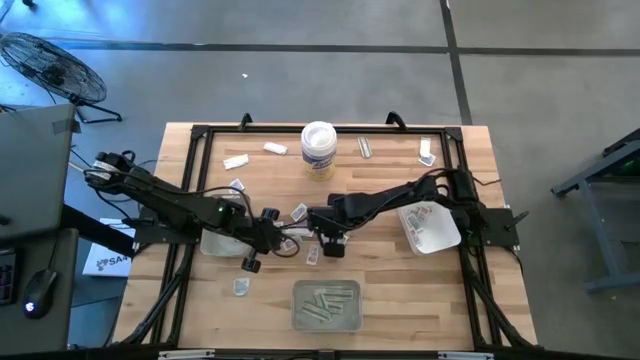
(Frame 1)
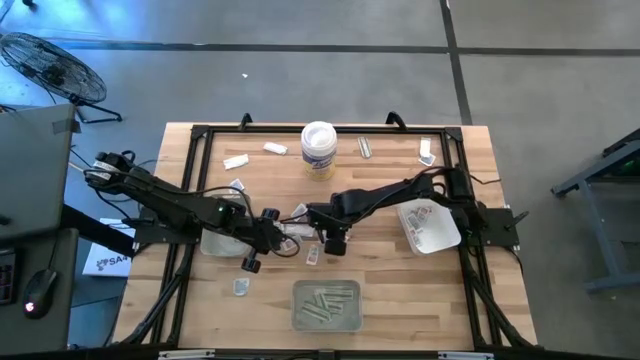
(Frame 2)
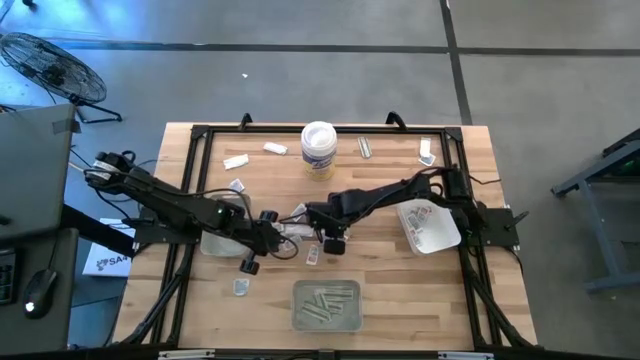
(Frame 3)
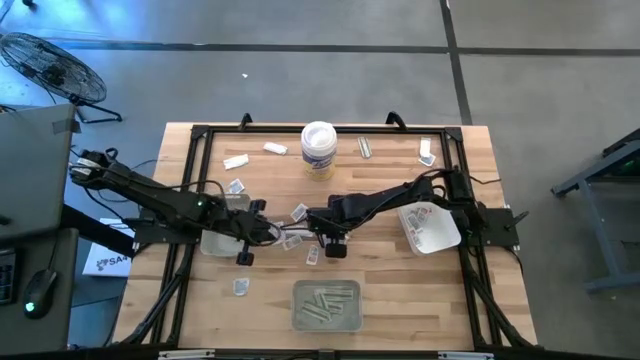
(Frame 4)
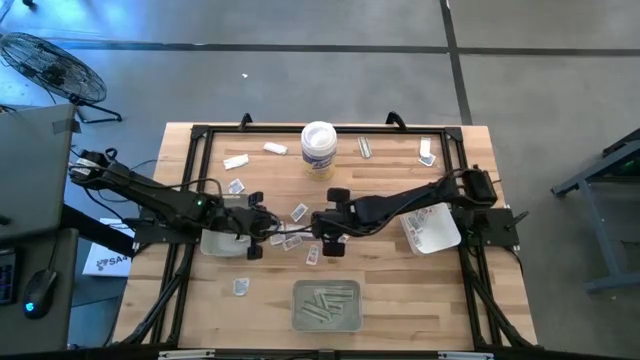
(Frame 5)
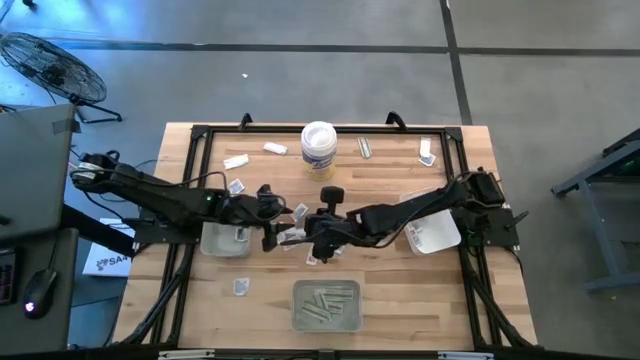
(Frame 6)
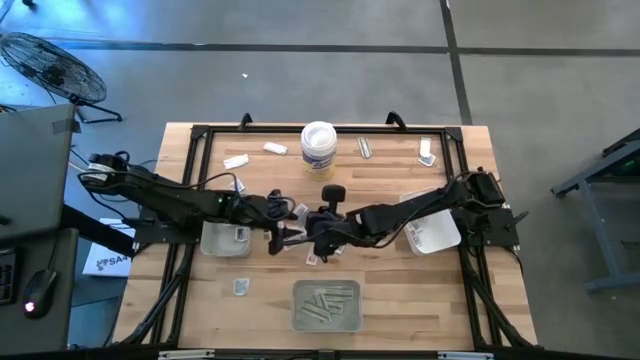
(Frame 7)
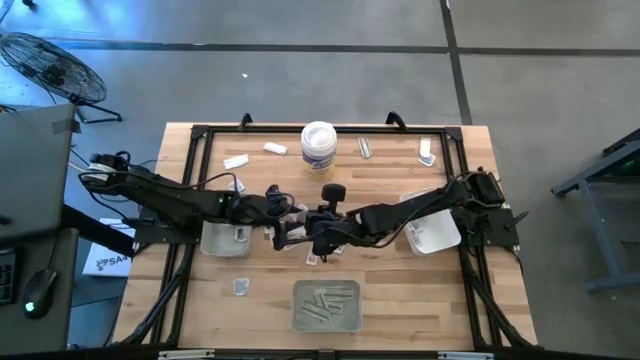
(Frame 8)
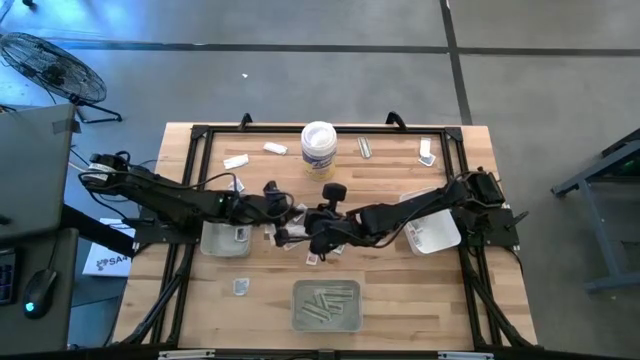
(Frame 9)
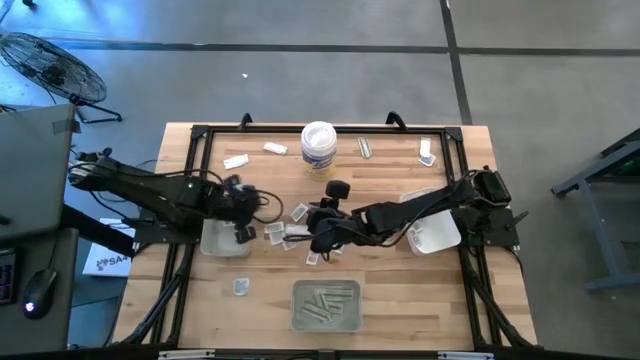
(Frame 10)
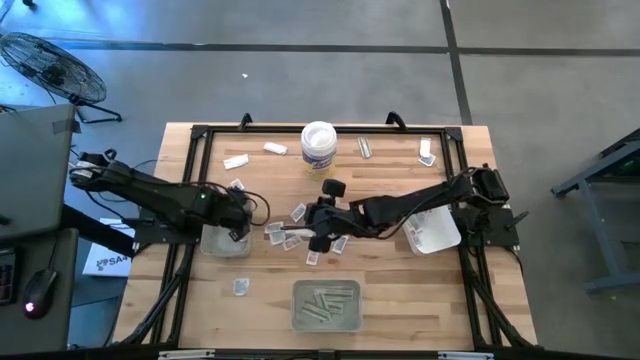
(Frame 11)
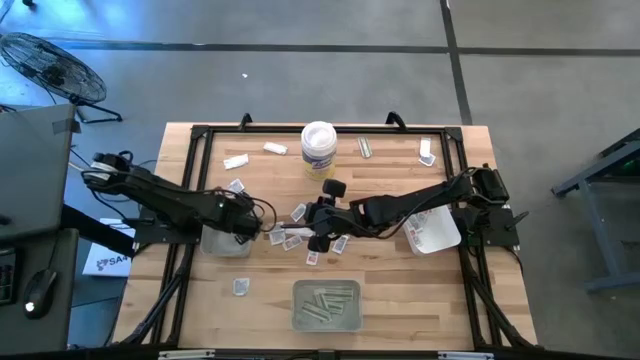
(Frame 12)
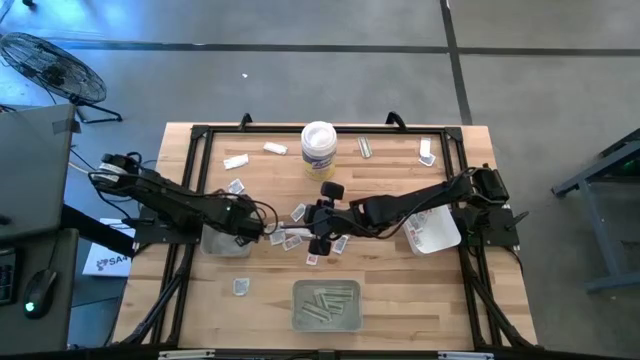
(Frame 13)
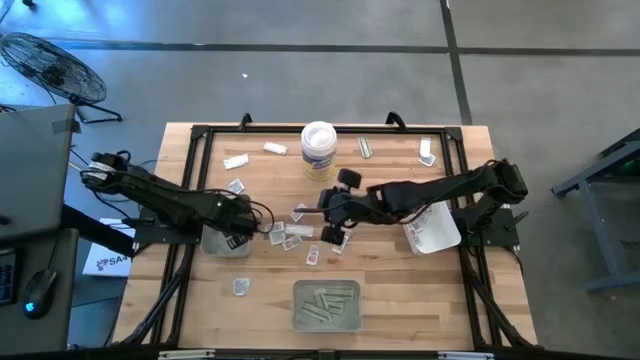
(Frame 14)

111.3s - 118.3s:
Task: Pick & Place First Aid Supplies
Put the blue alcohol pad into the top gray bin

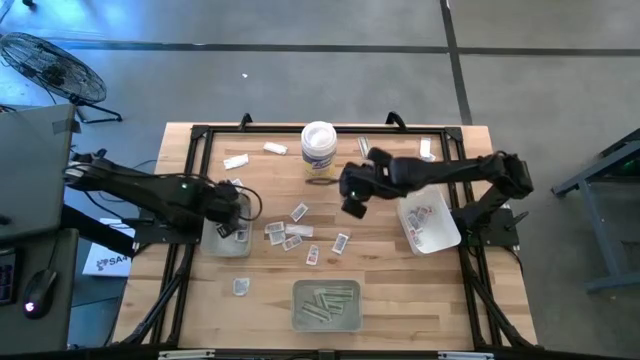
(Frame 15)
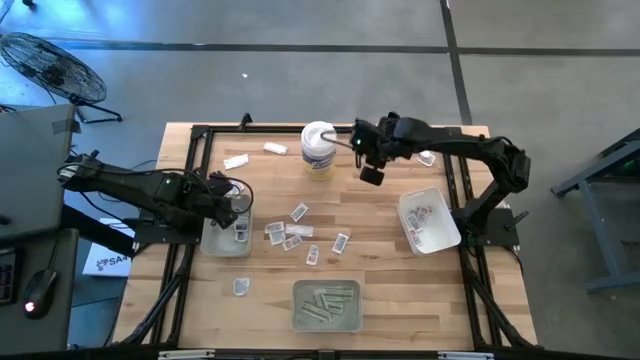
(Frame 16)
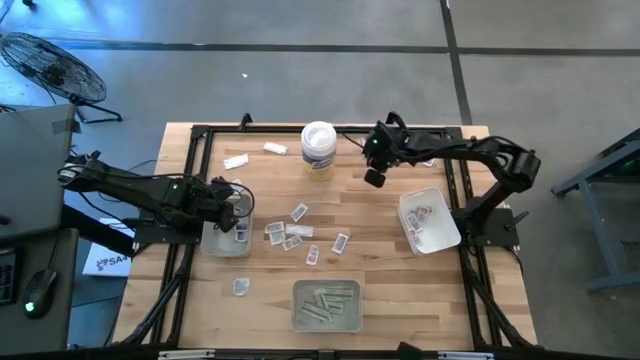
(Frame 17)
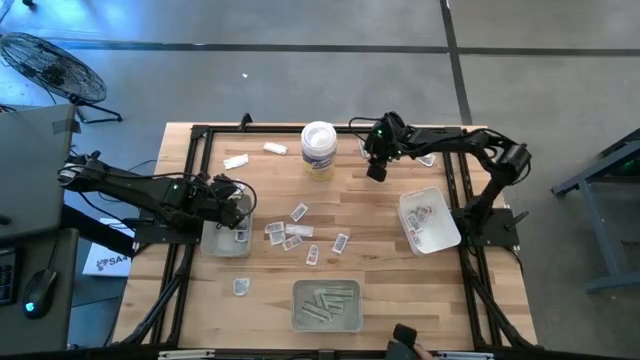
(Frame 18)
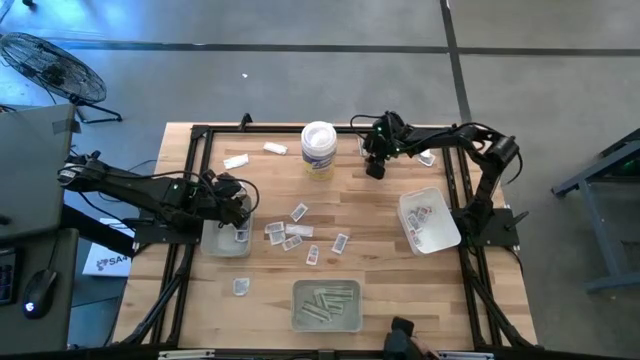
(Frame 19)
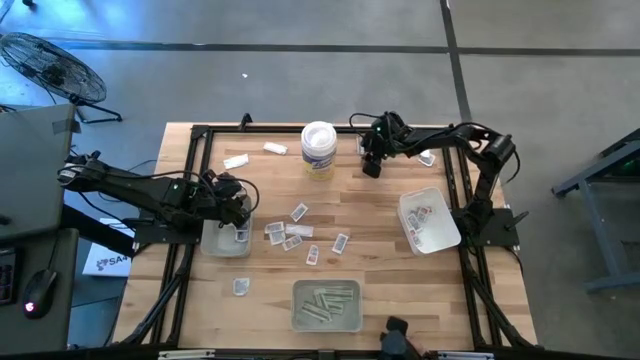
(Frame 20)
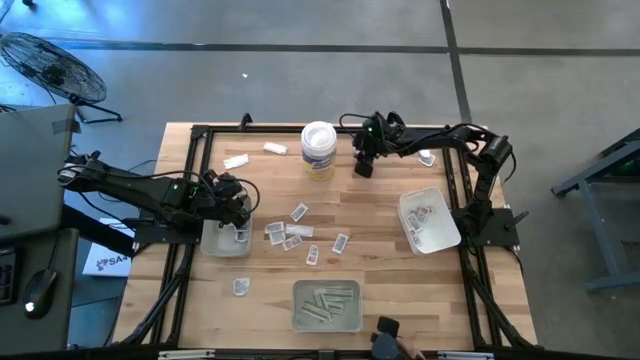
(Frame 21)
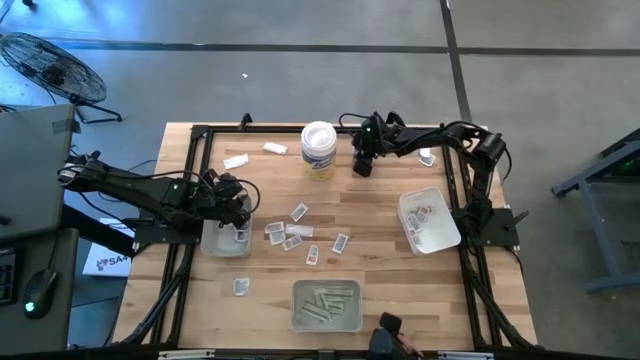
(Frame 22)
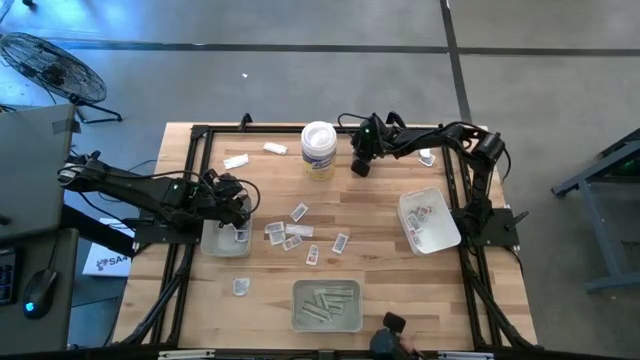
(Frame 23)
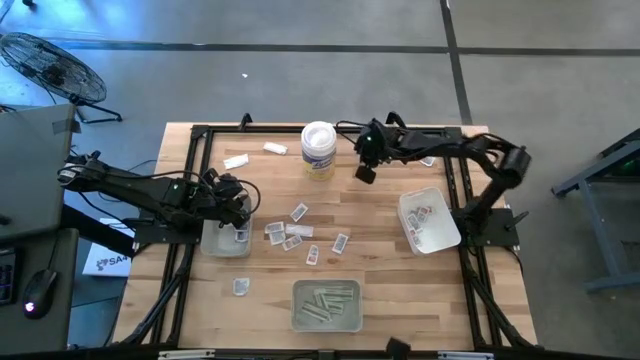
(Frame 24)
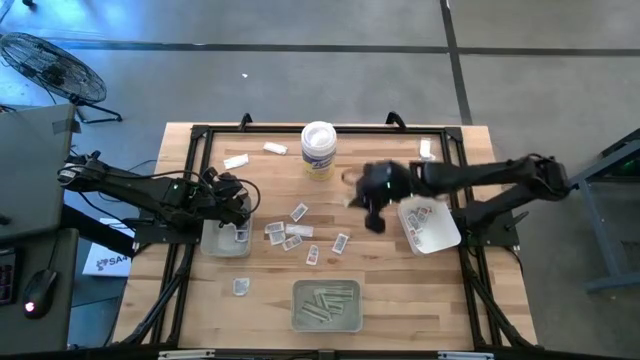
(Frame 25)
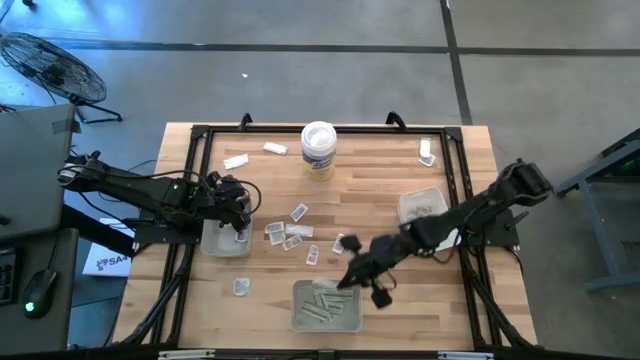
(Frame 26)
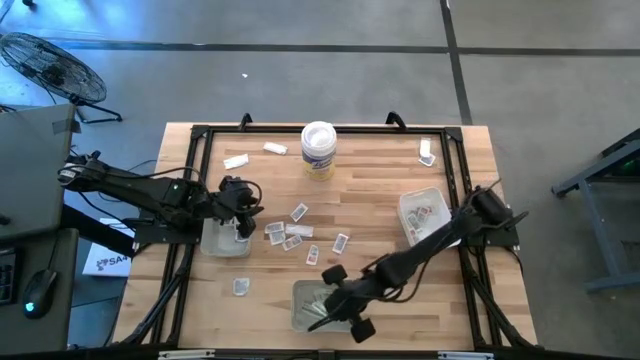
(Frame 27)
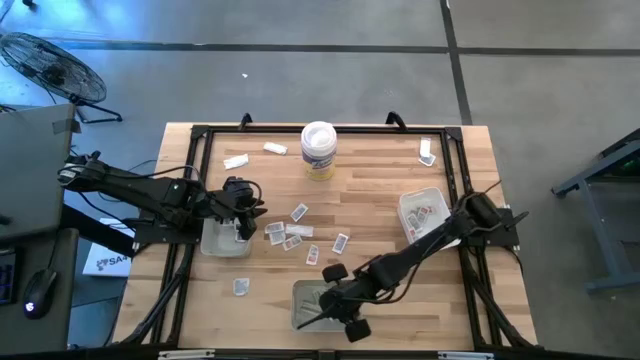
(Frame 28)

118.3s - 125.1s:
Put the green bandage pack into the bottom gray bin

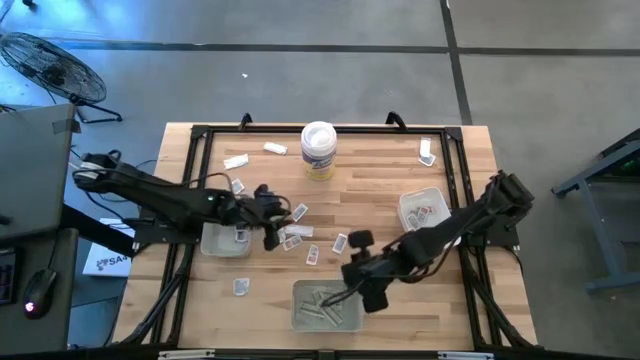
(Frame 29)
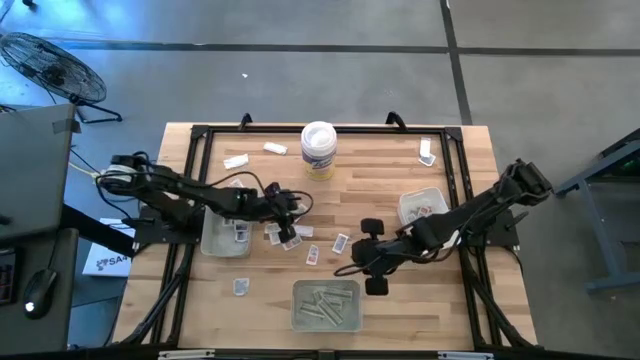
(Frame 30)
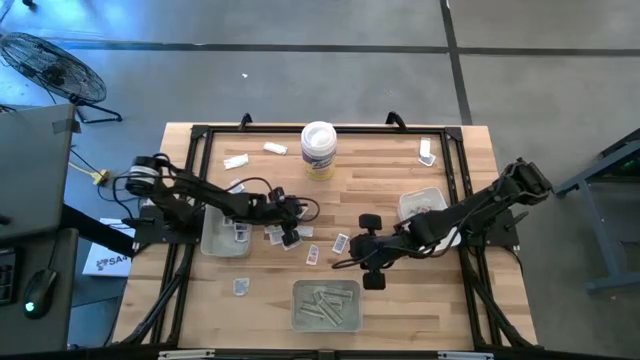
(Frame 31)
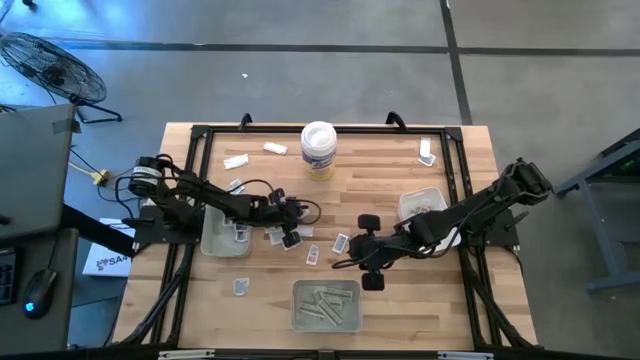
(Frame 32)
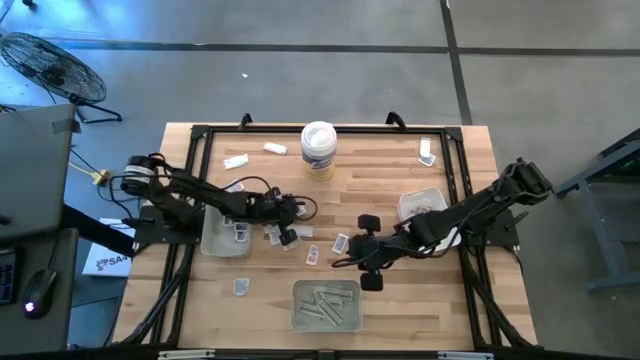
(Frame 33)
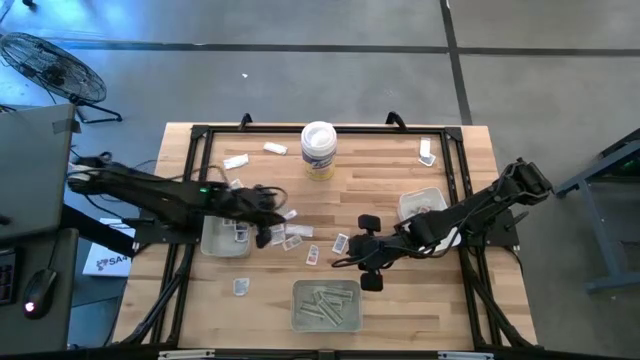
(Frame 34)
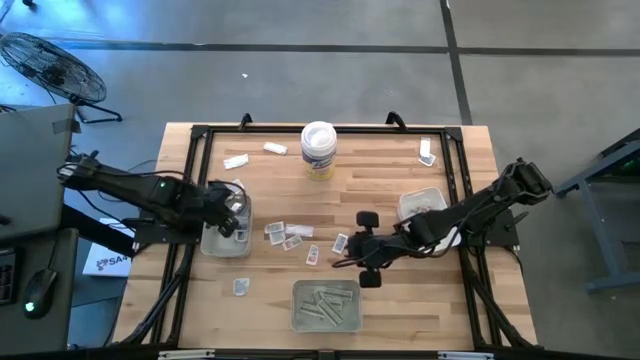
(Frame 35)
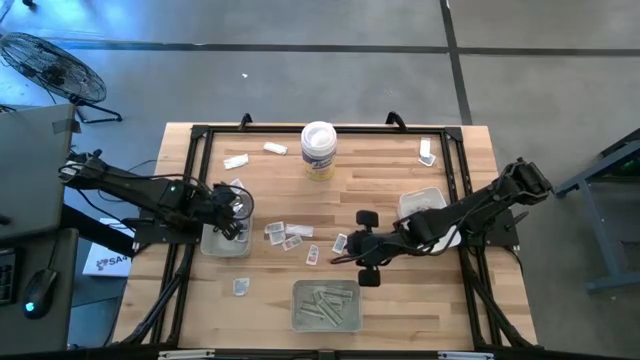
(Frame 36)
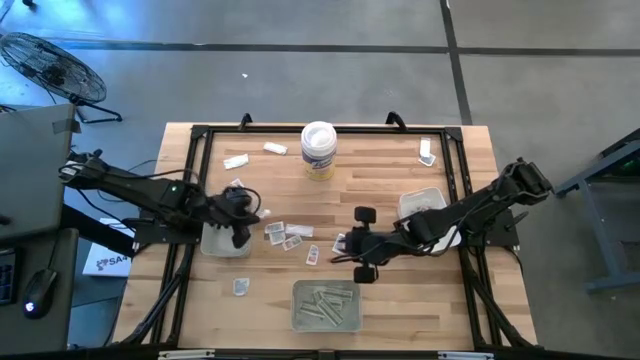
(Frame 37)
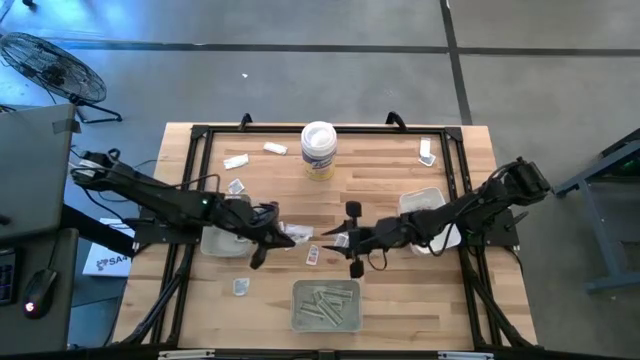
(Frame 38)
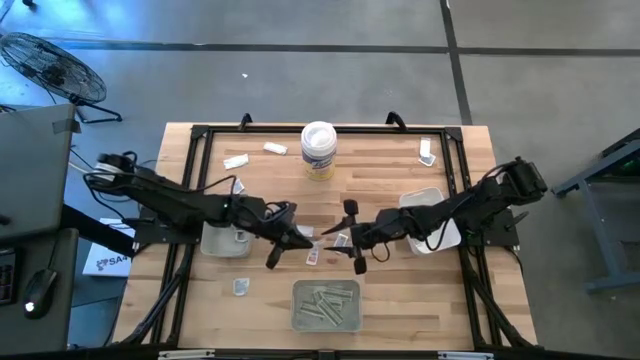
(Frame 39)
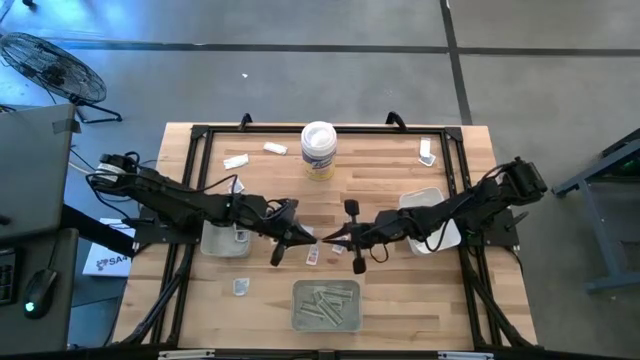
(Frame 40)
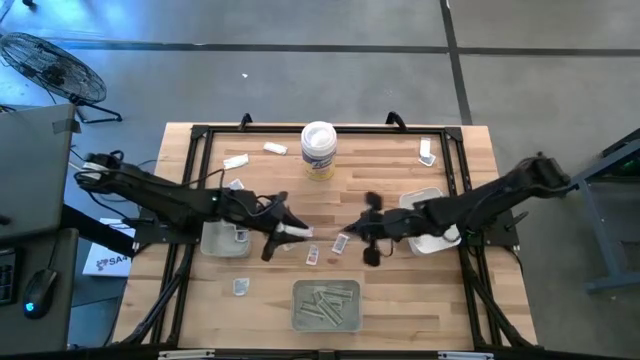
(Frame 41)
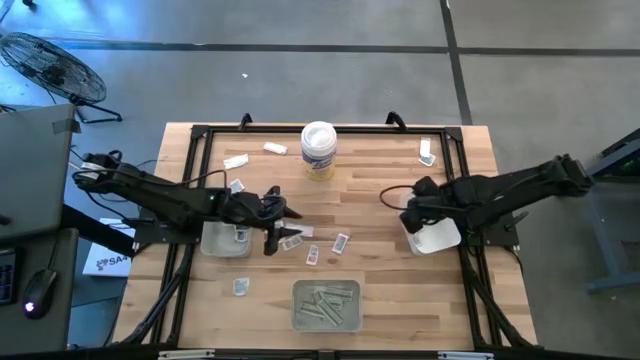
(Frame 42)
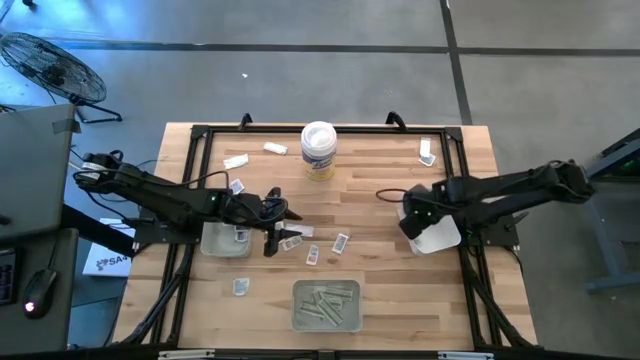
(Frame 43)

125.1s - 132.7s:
Put the orange ointment pack into the white bin
